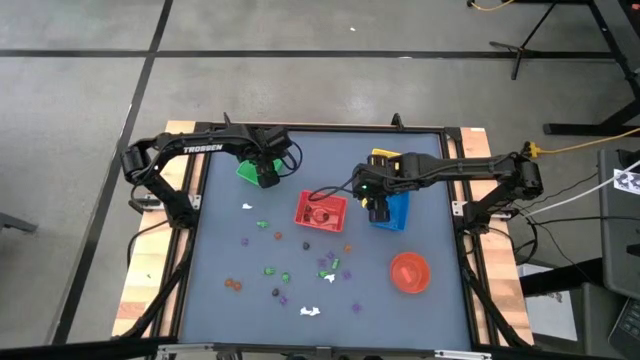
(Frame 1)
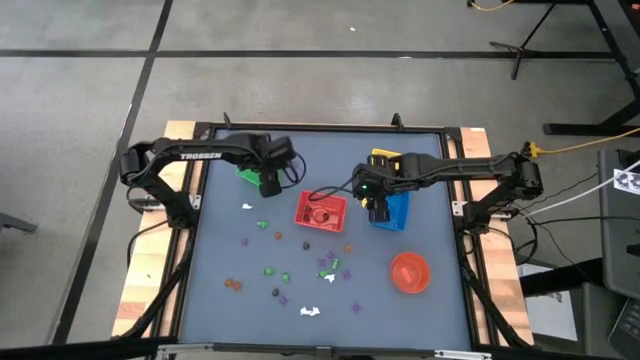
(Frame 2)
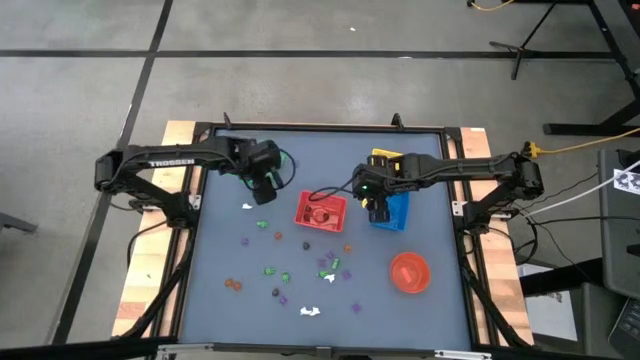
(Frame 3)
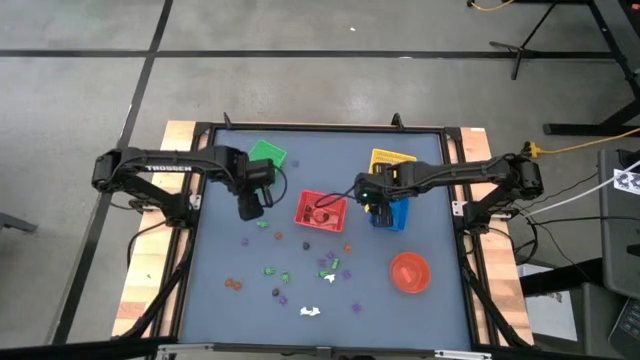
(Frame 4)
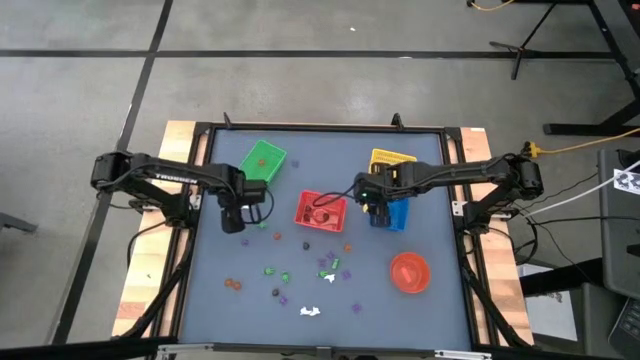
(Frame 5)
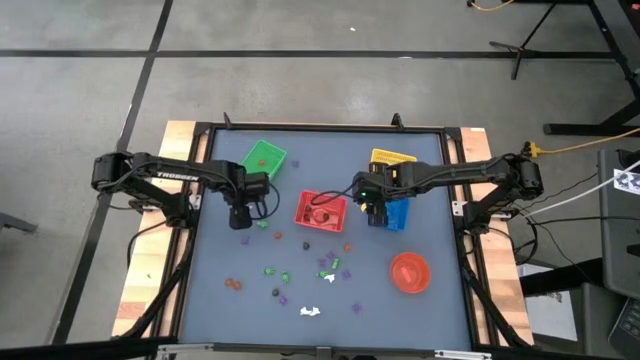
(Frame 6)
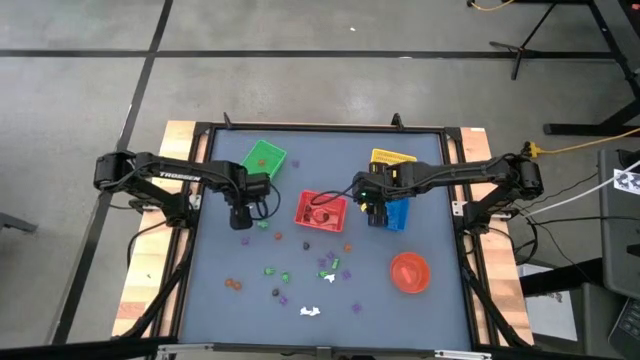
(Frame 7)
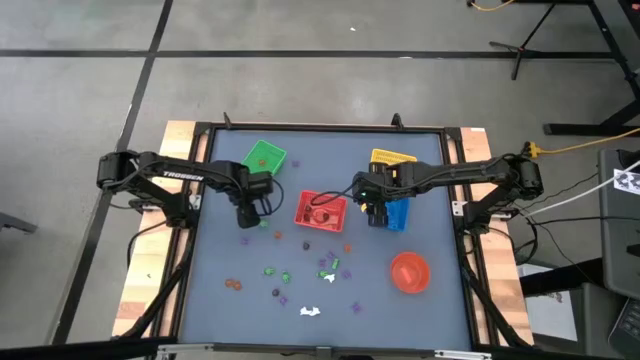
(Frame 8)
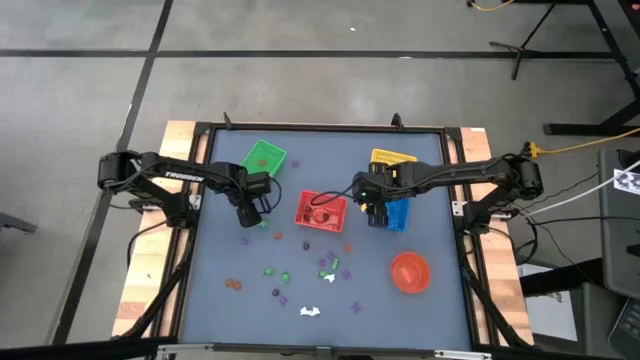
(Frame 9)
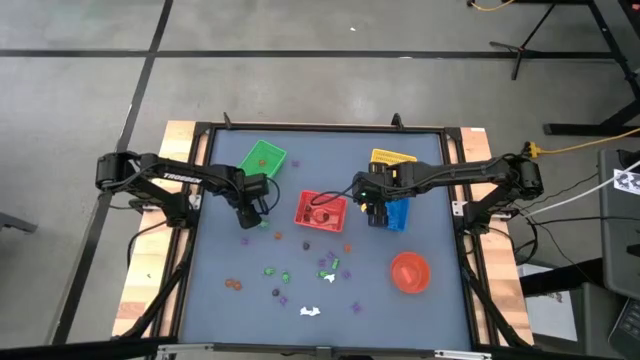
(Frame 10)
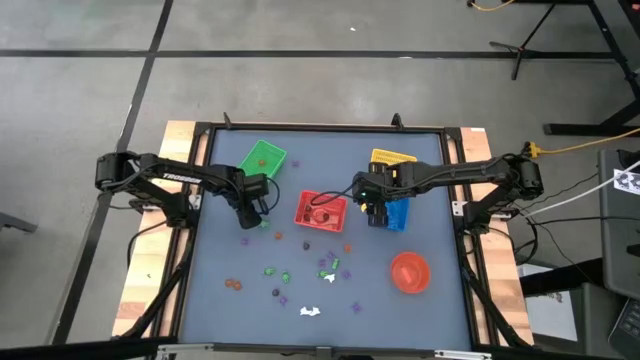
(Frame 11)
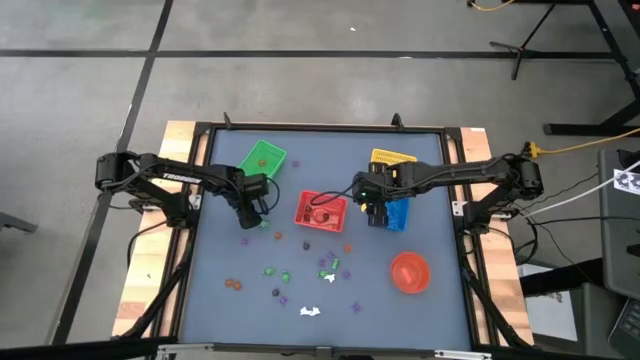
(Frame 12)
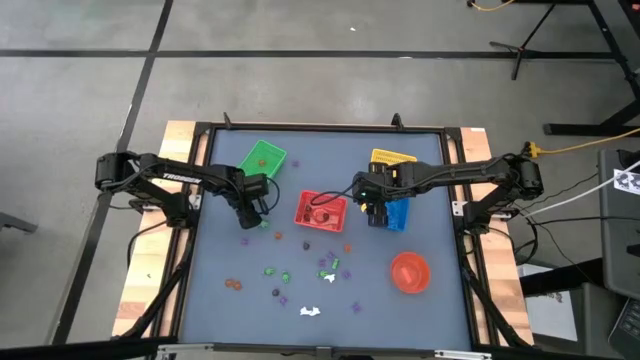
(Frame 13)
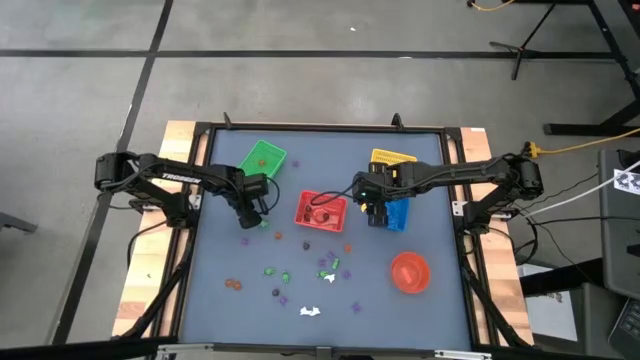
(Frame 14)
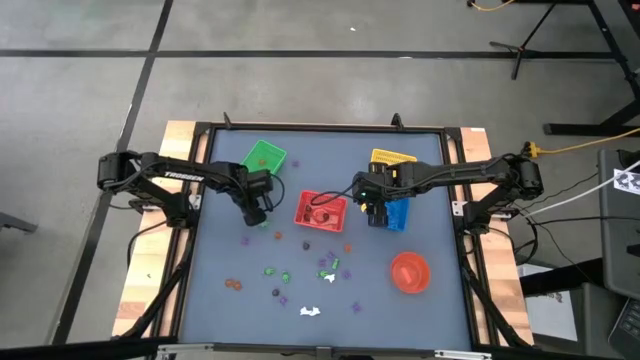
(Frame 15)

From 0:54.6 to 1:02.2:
Task: Sort Halloween decoration
Put the white ghost toy into the yellow bin

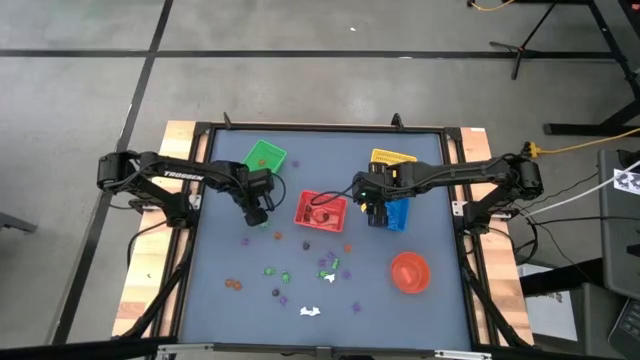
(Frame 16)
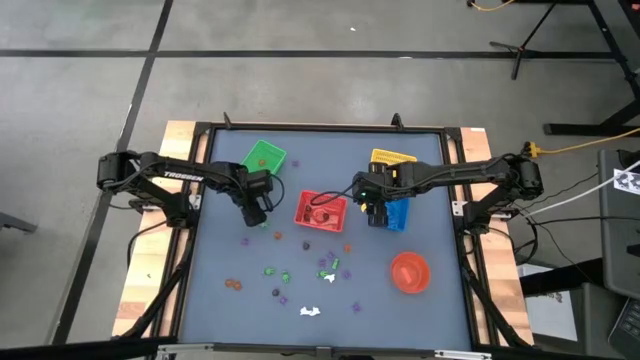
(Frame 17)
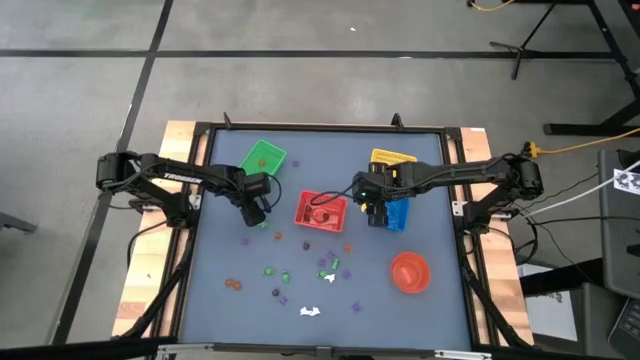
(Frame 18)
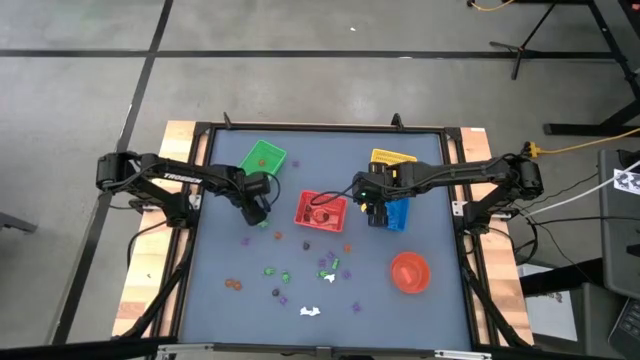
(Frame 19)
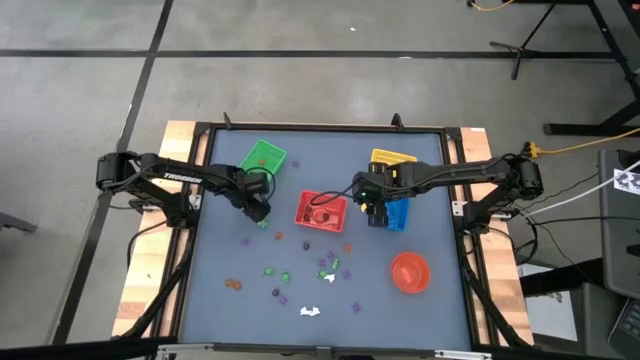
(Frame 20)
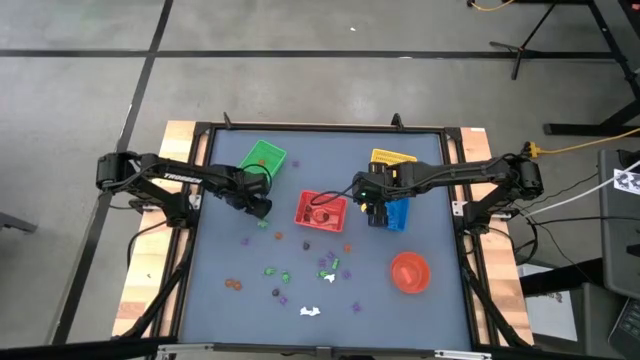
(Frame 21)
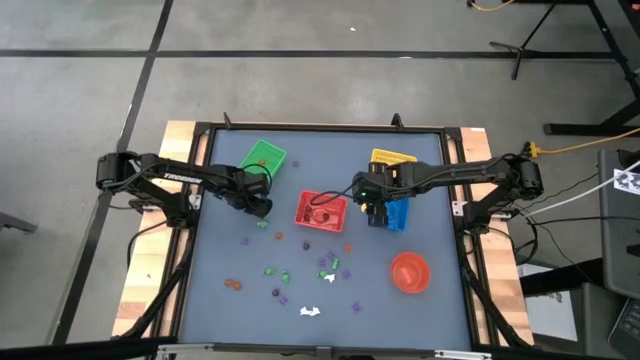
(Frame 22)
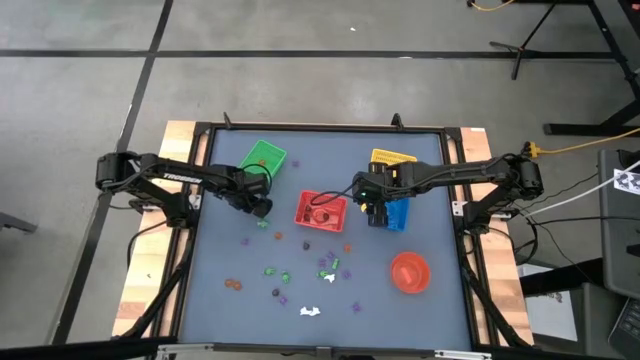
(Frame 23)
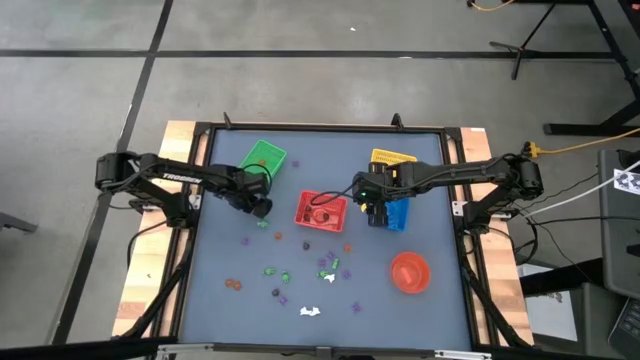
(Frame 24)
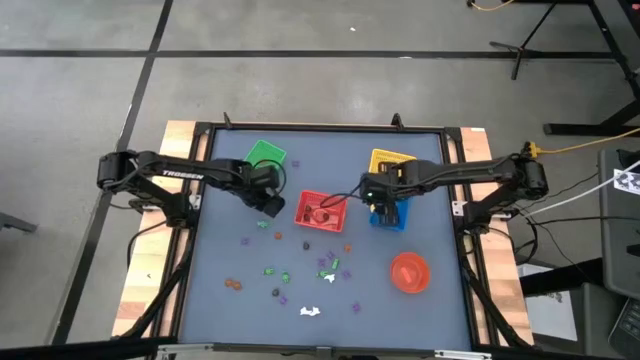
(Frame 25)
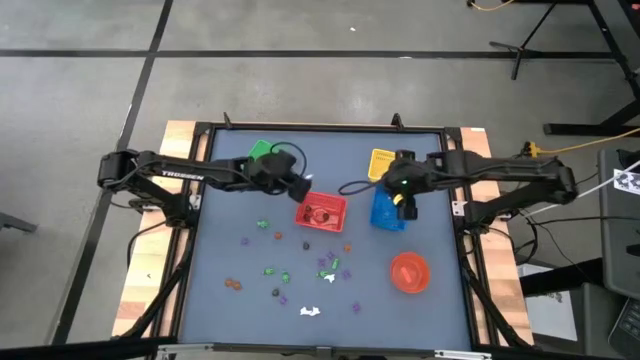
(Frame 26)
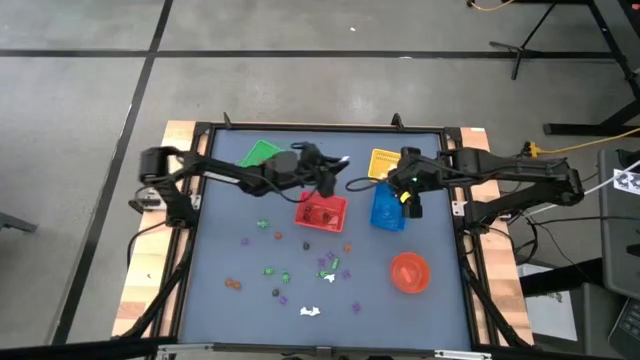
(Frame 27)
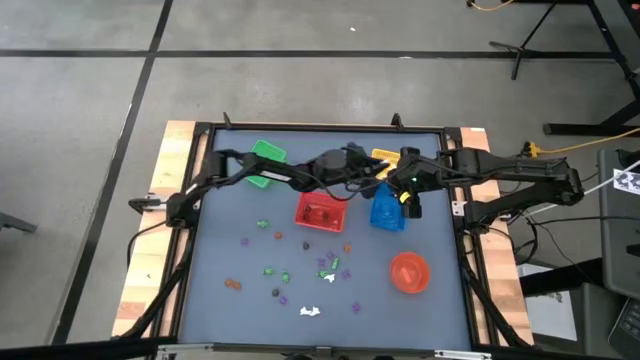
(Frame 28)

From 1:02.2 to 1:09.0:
Put the white ghost toy into the yellow bin

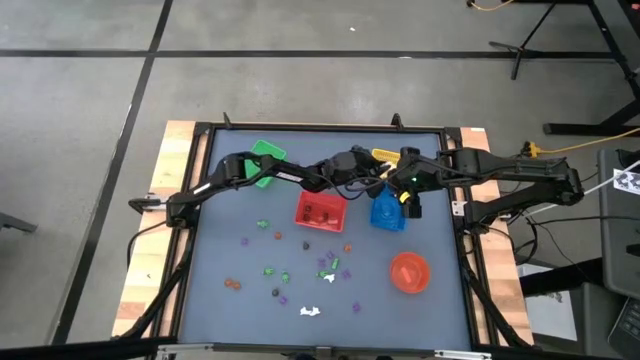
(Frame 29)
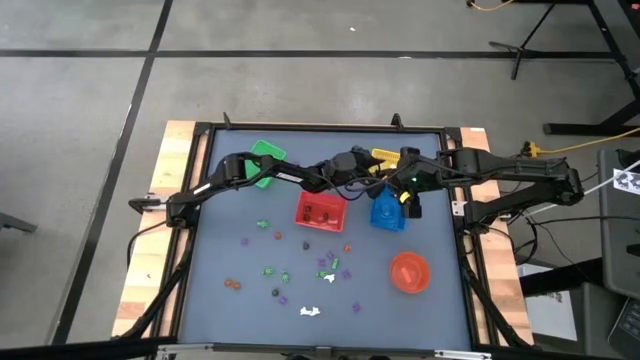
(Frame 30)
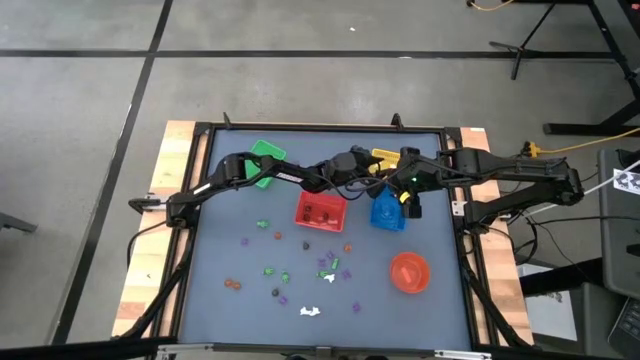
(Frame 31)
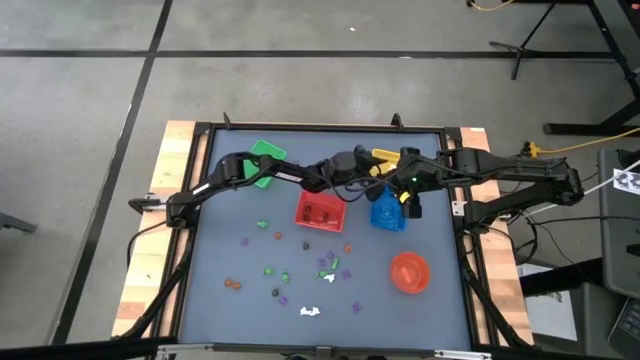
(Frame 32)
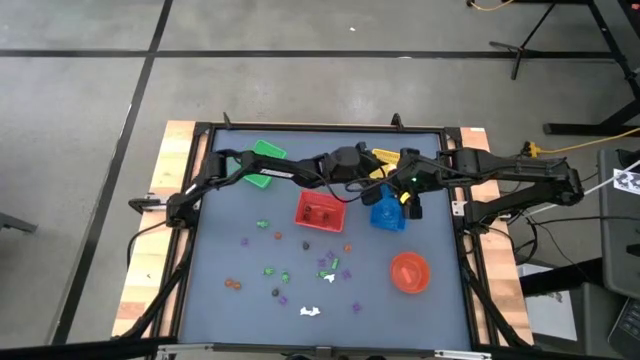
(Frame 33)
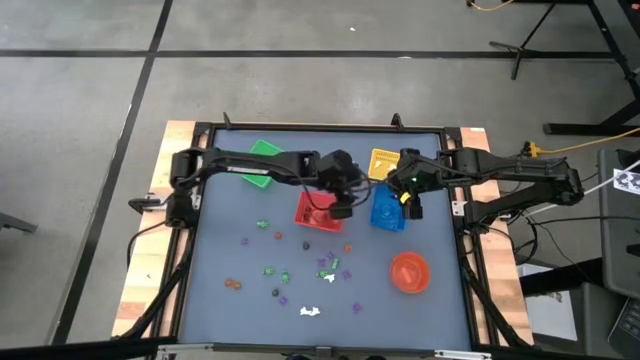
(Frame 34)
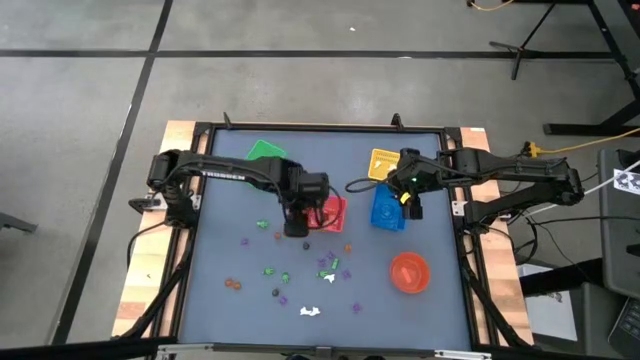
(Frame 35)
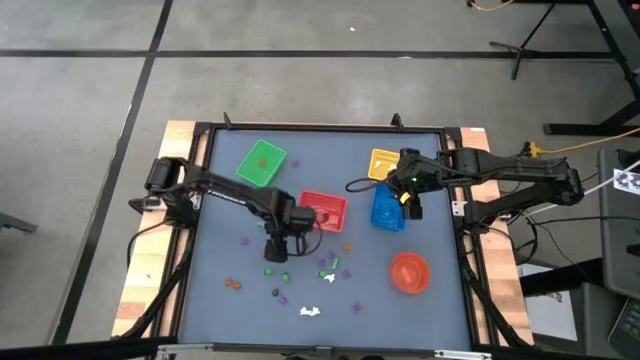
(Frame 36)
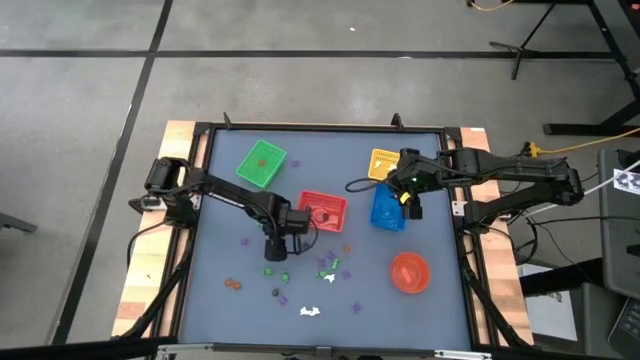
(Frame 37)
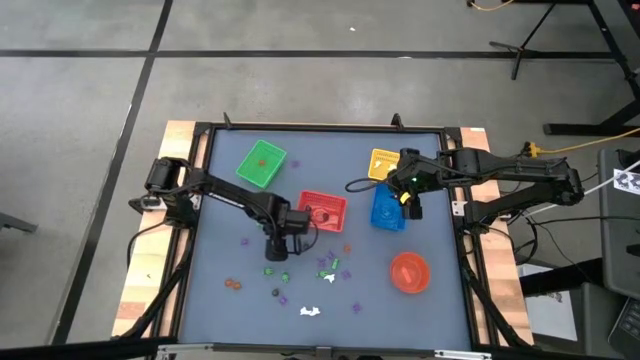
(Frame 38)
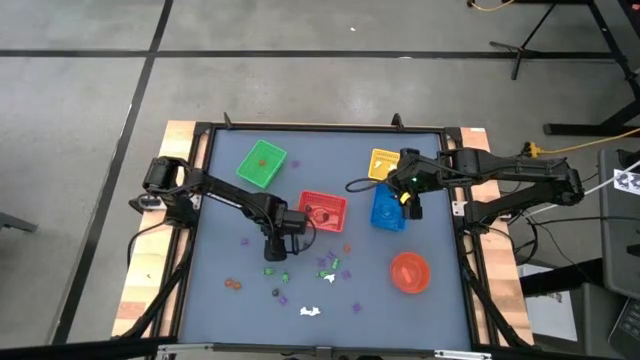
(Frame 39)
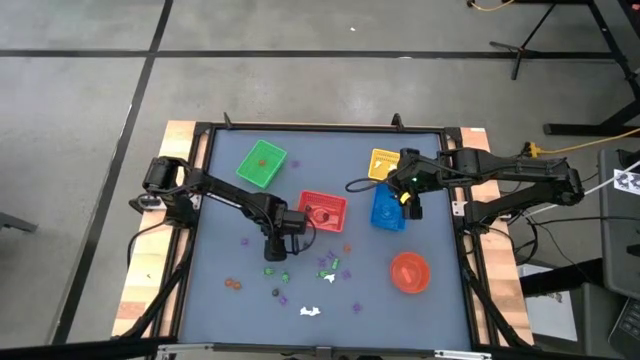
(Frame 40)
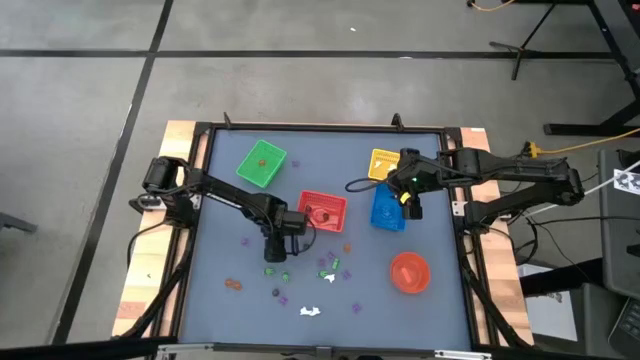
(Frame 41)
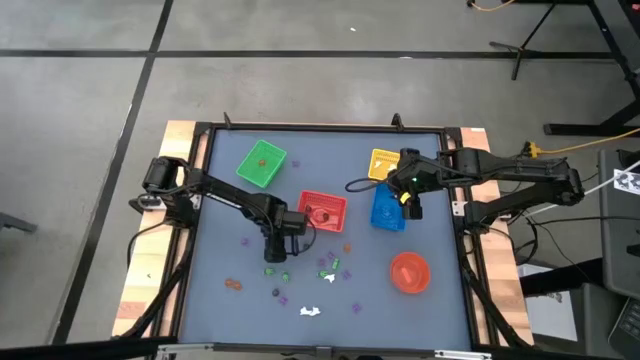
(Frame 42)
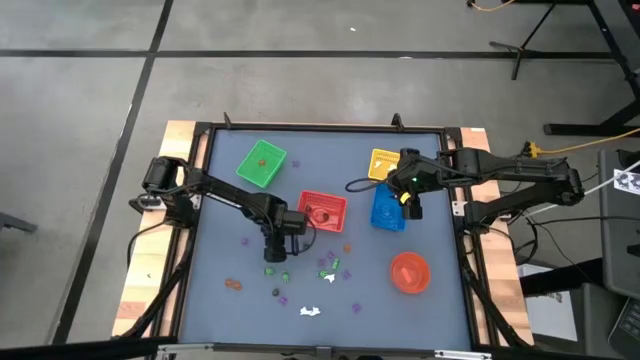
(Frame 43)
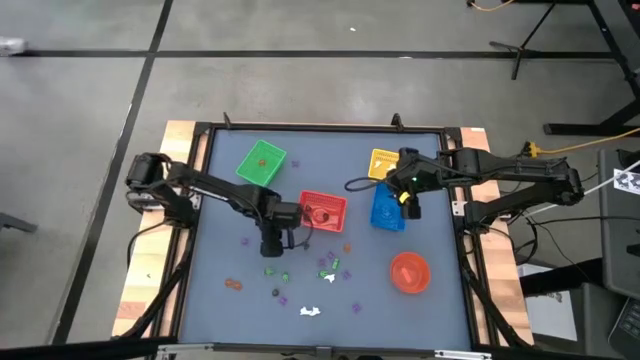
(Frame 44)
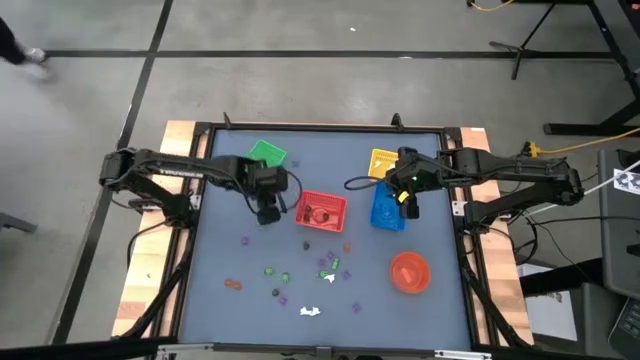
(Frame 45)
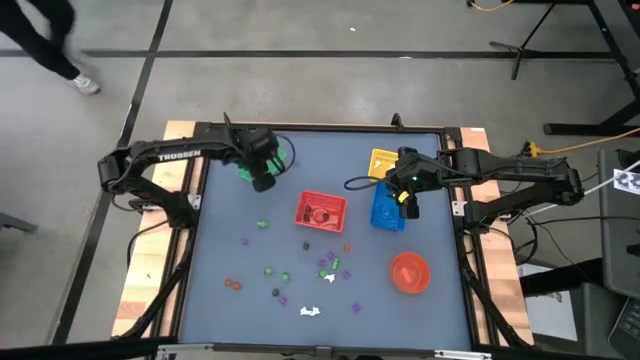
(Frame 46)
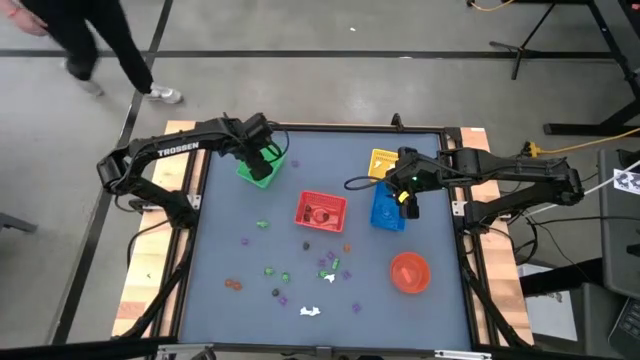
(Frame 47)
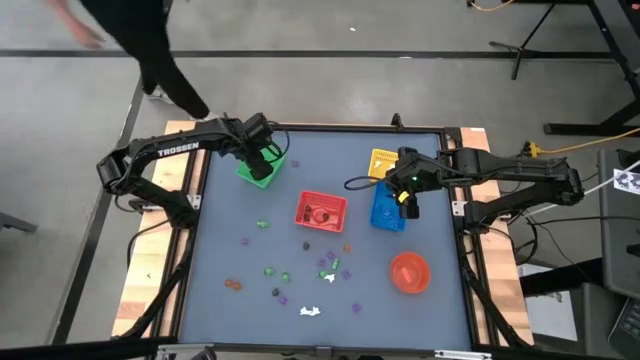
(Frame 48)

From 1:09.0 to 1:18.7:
Put the orange pumpkin toy into the green bin
